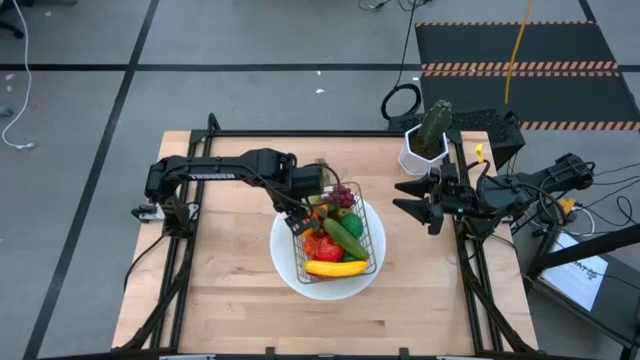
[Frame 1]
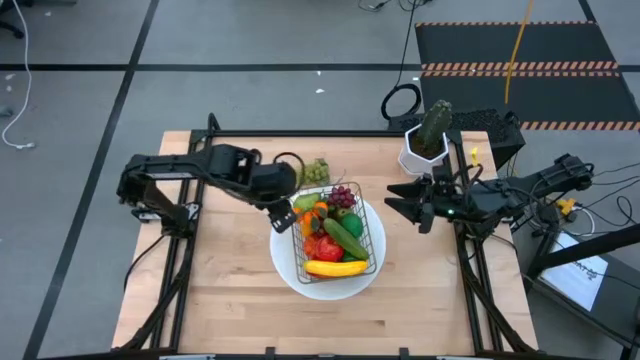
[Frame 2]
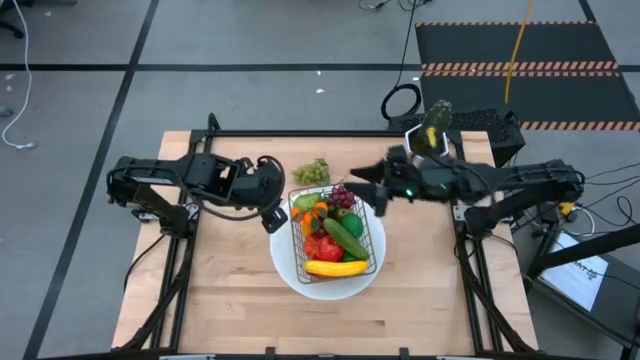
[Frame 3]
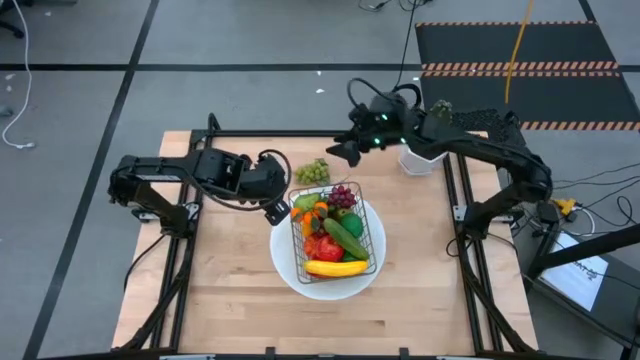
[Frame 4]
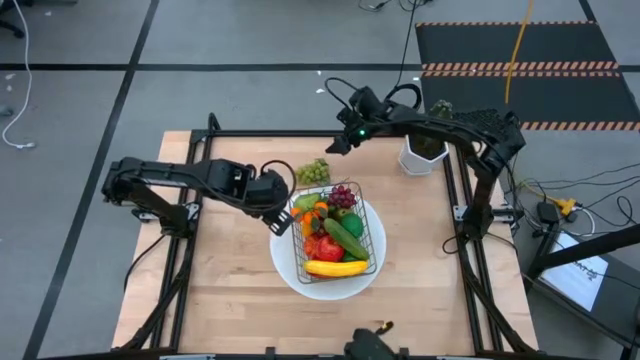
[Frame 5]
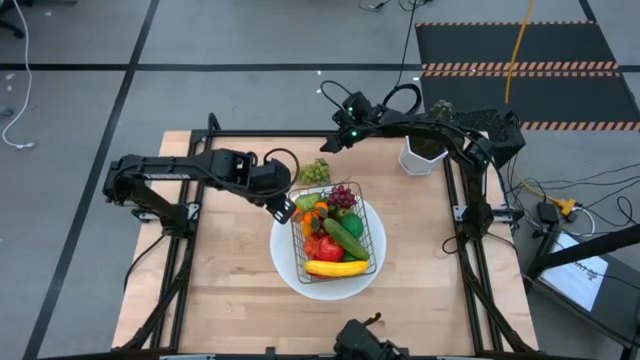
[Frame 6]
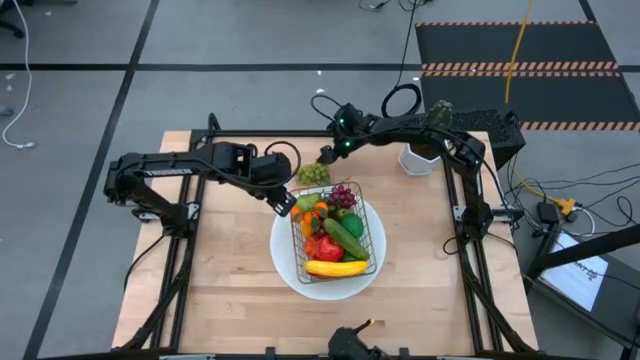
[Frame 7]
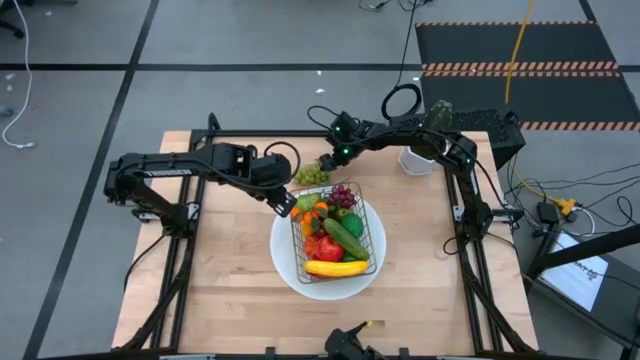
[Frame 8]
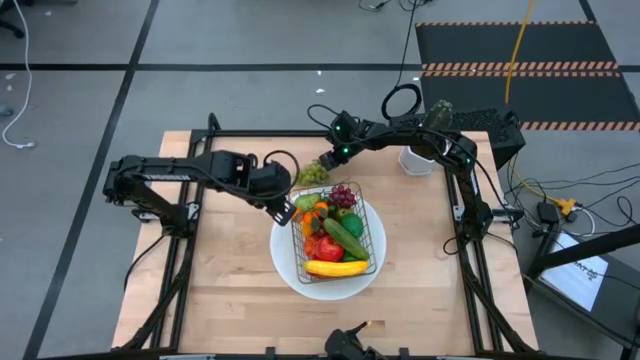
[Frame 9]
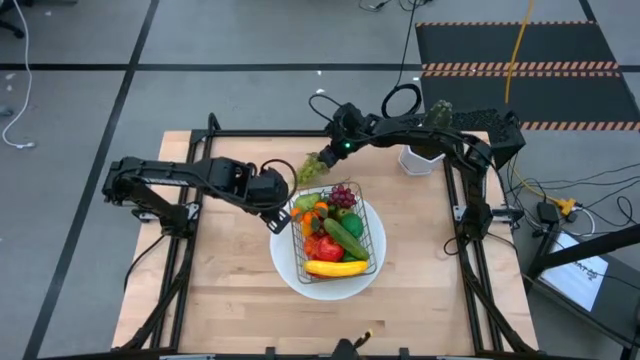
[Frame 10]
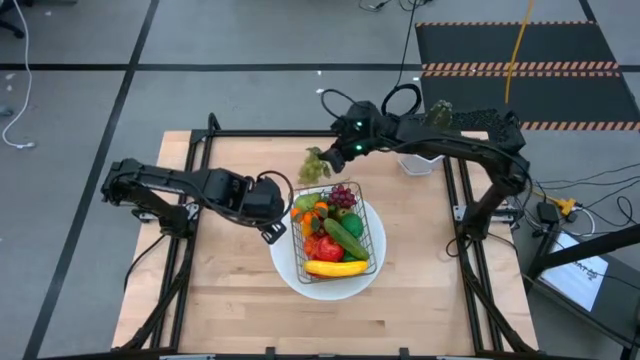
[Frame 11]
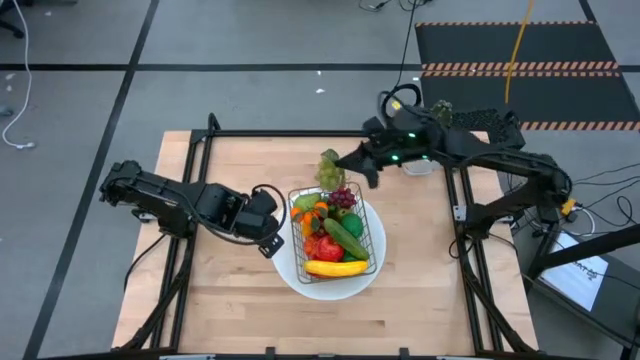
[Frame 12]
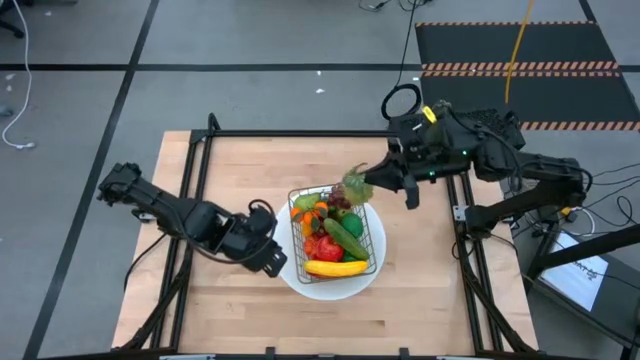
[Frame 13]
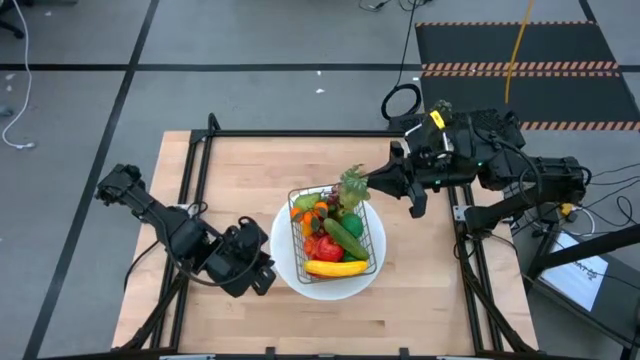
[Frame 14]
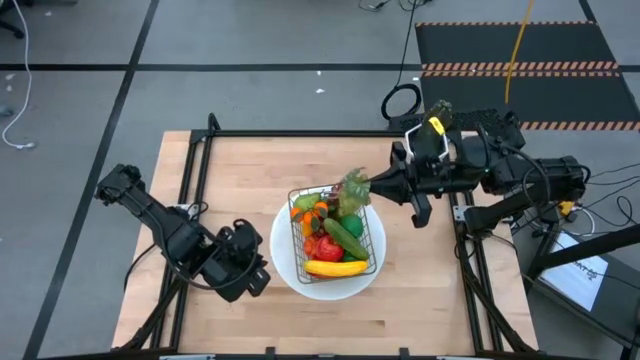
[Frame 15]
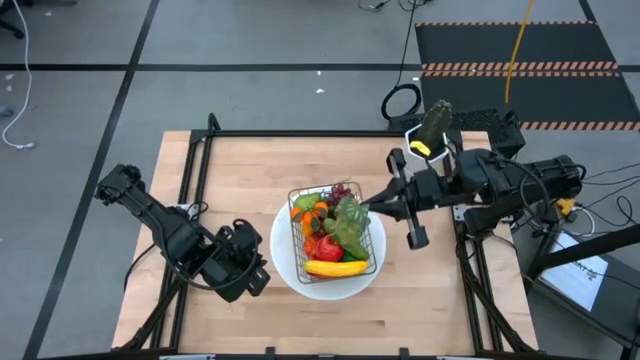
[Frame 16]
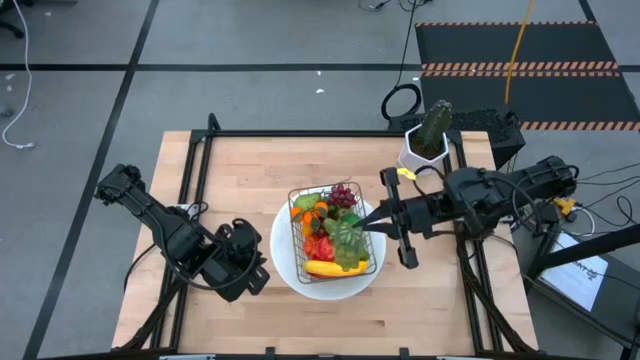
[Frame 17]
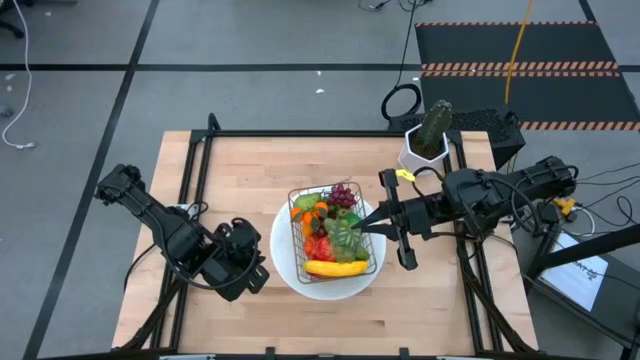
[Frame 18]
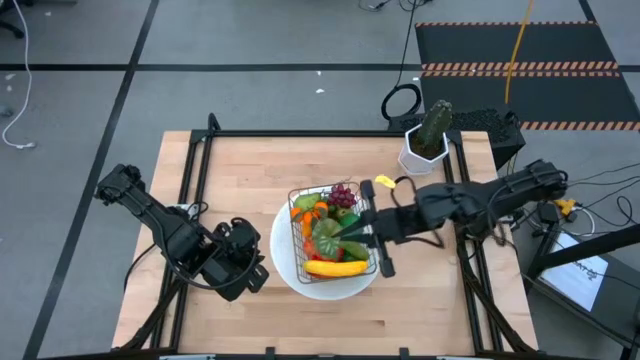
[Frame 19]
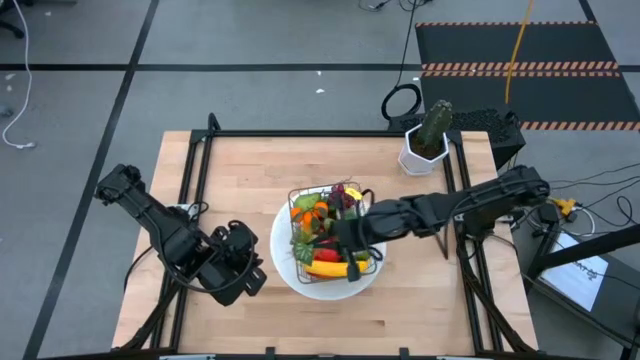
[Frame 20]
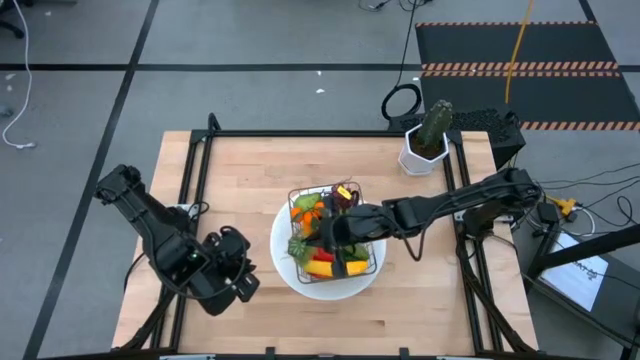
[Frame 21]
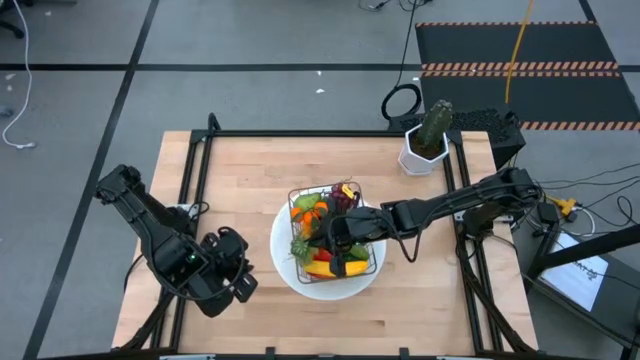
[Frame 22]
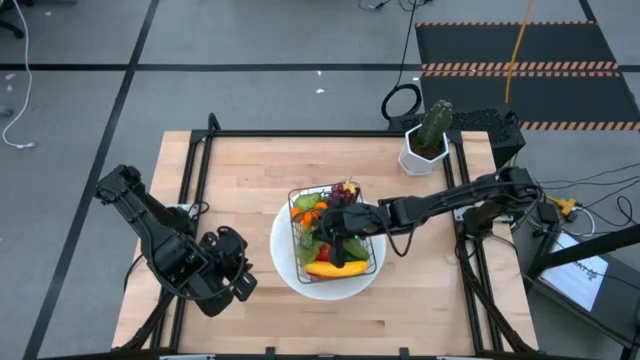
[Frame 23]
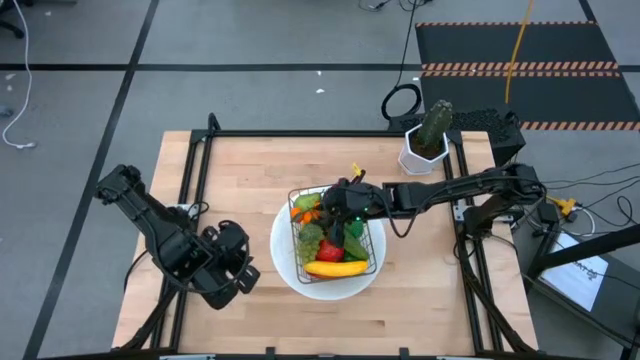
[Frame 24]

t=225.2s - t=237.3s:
Task: Build produce basket
Put the green grapes into the black wire basket

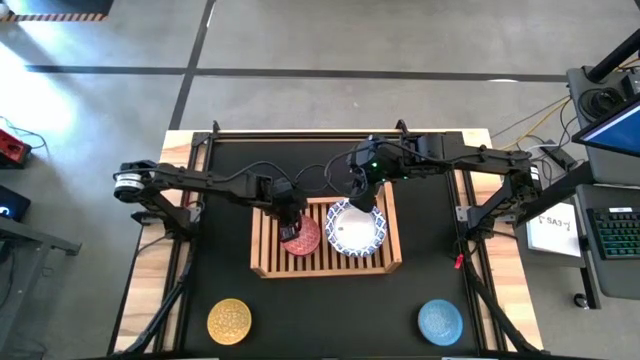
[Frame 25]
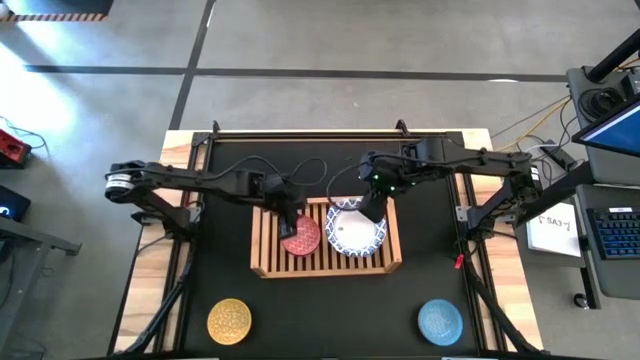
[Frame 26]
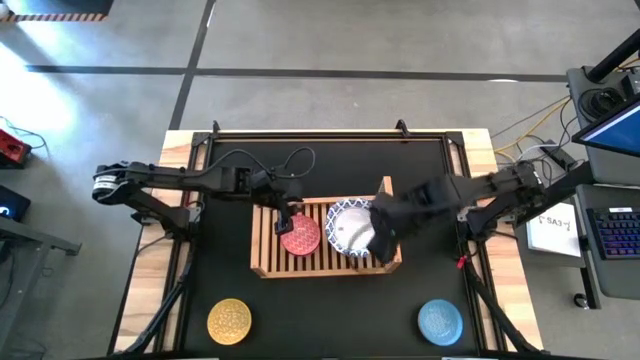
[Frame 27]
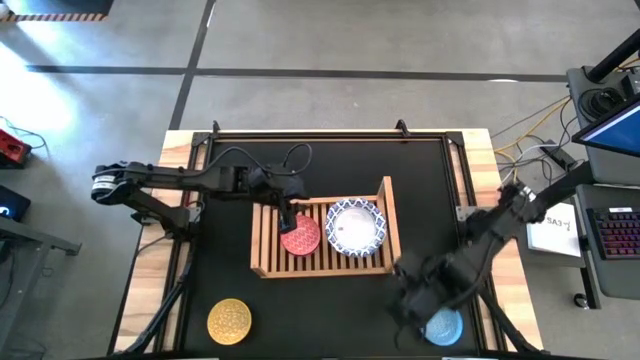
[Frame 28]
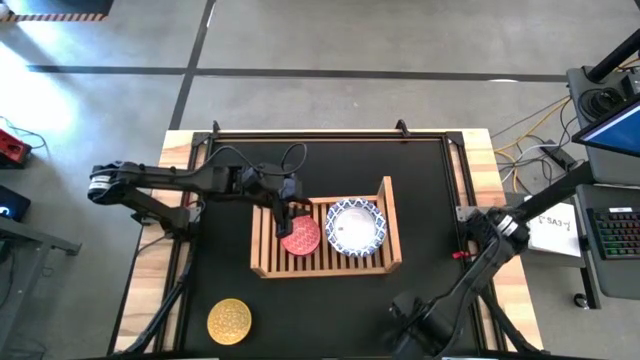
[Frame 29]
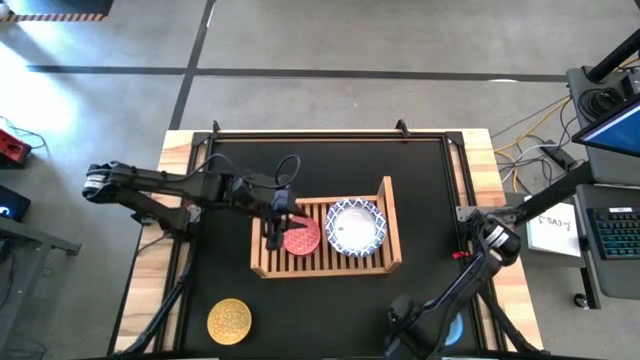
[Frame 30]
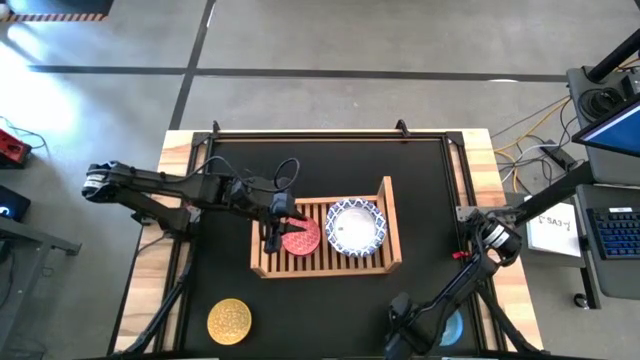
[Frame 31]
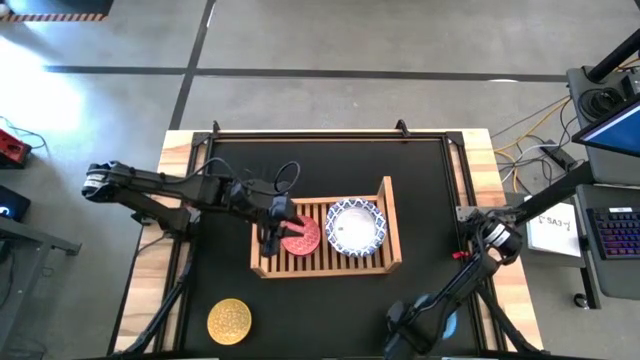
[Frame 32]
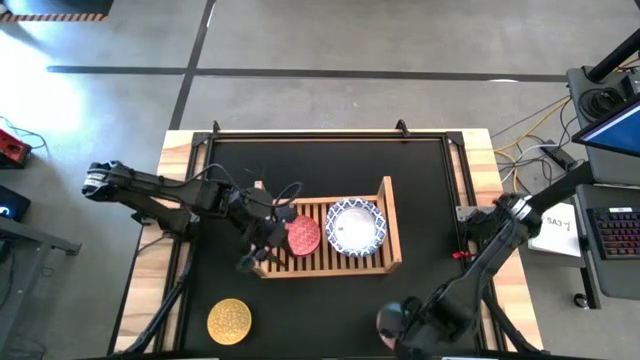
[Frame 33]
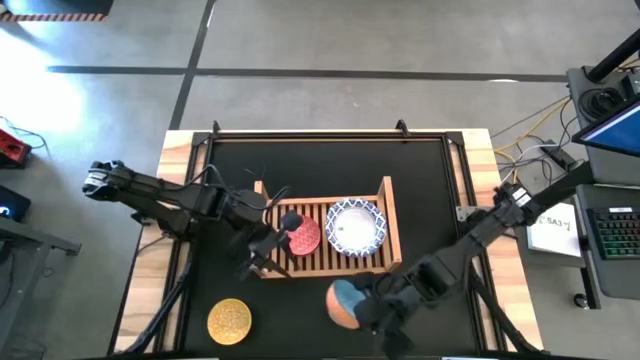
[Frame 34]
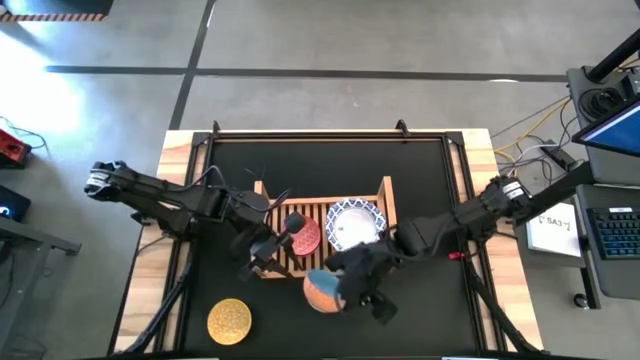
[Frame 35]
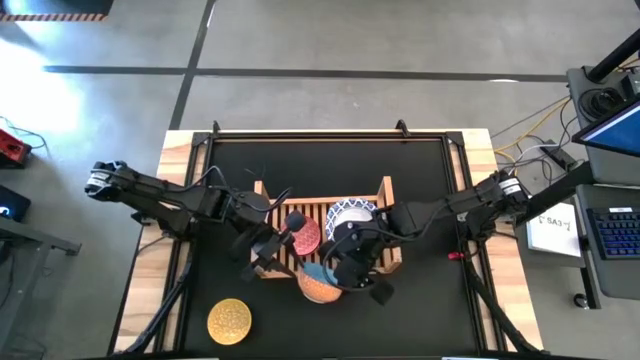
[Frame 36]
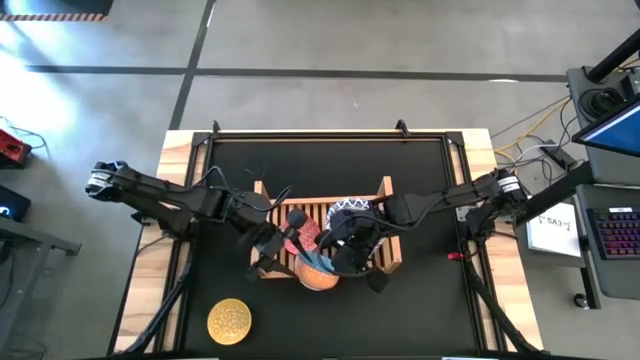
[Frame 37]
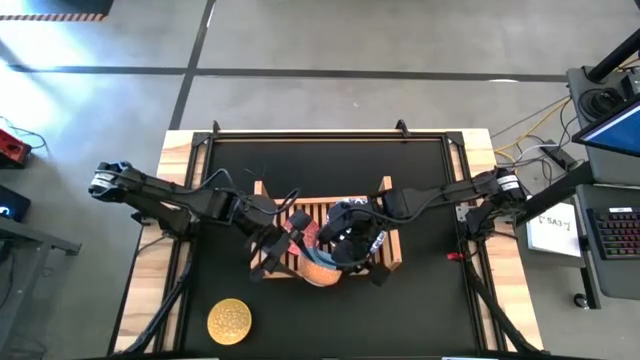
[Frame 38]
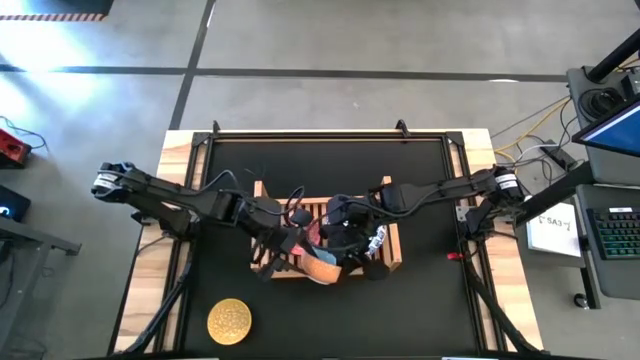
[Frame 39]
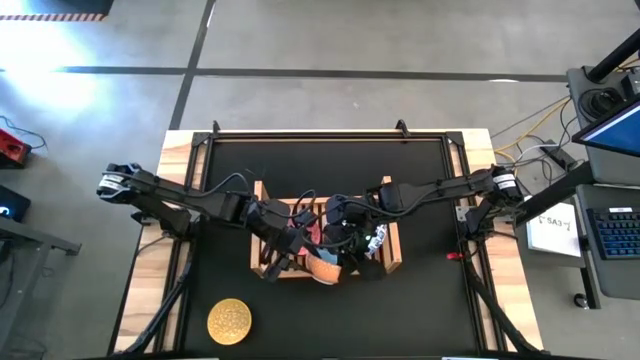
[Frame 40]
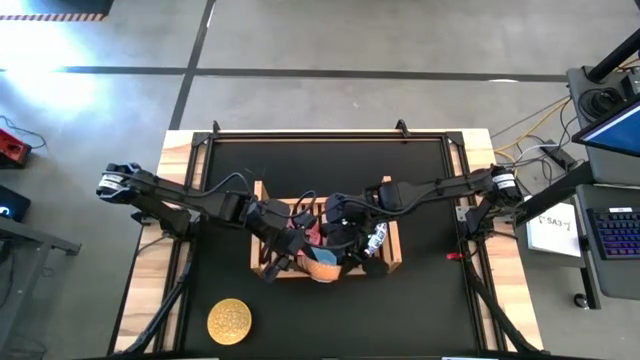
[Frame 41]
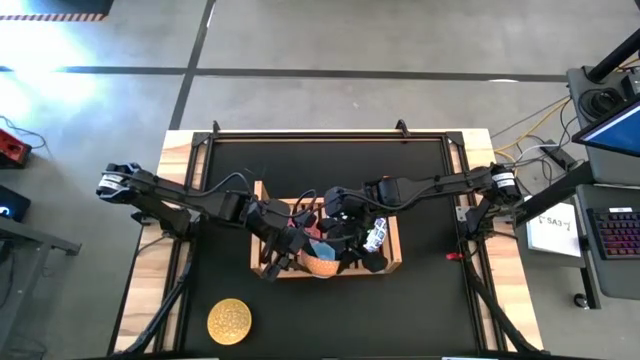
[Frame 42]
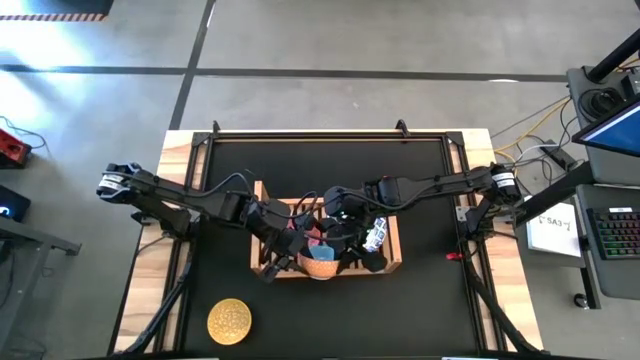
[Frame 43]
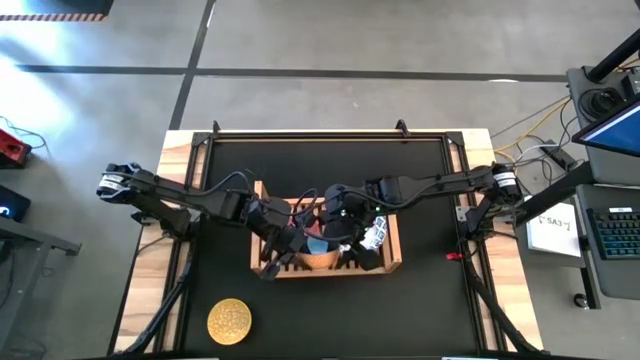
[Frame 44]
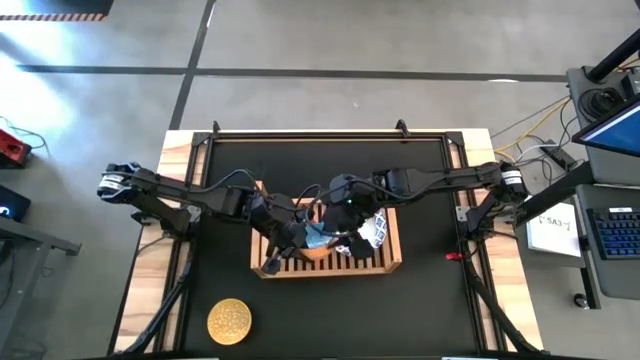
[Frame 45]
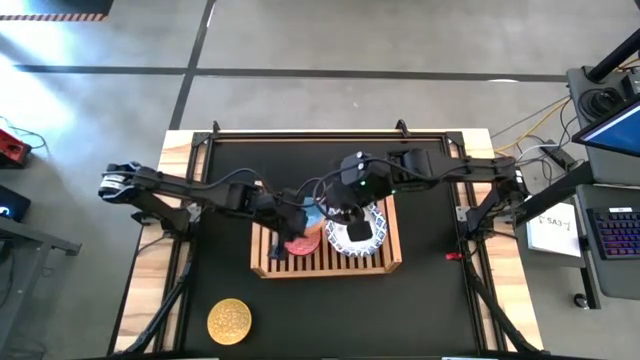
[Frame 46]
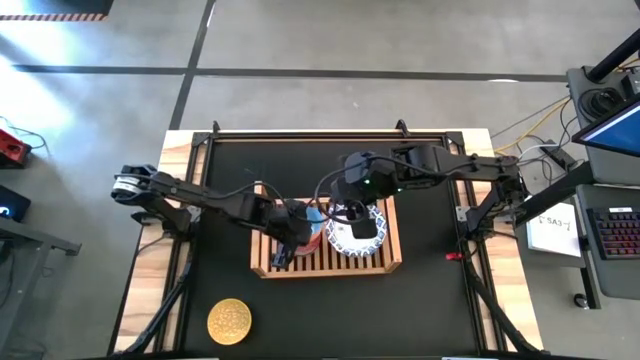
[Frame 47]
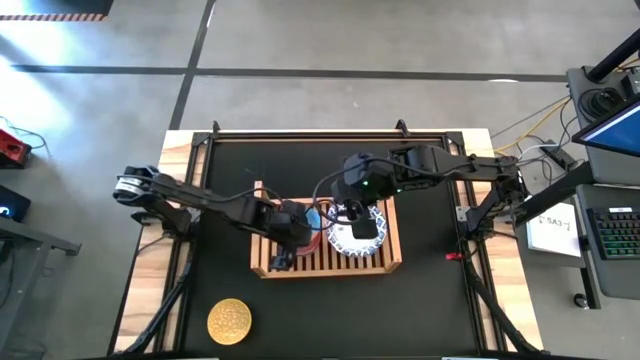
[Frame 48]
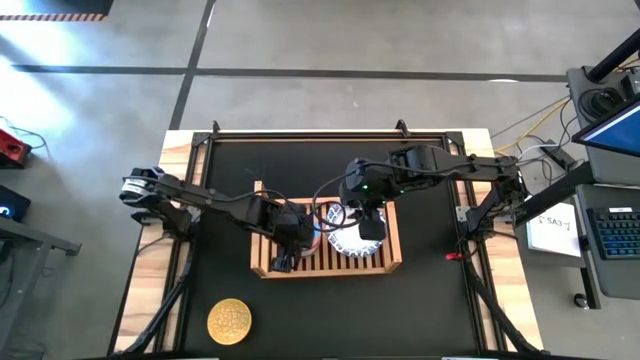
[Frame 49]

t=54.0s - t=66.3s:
Task: Place and stack bowls onto a shelf
Stack the blue patterned bowl on top of the red patterned bowl on the shelf
